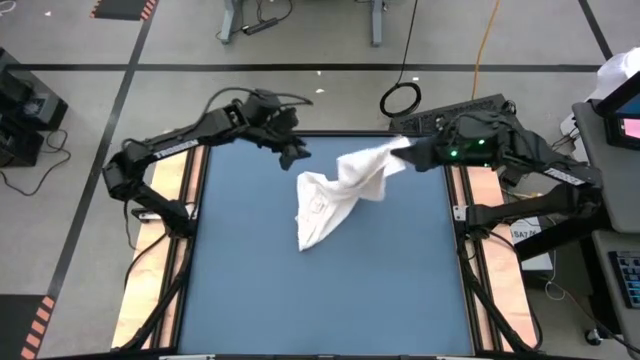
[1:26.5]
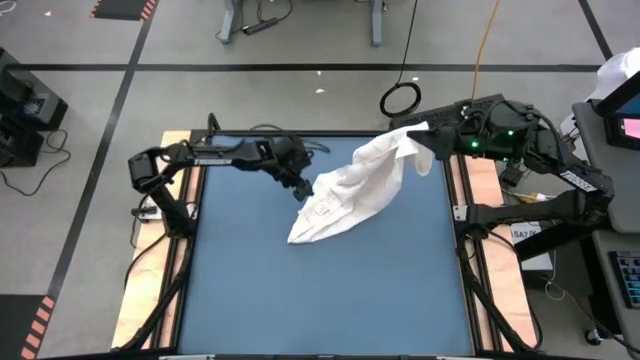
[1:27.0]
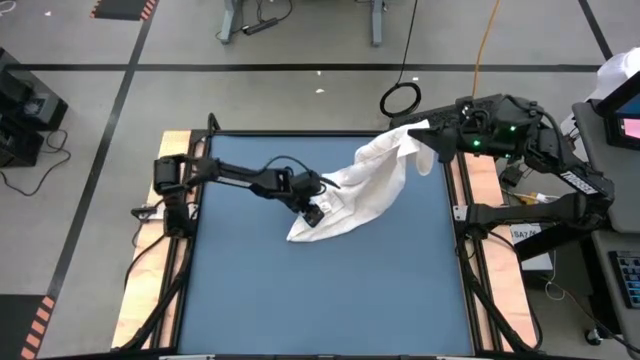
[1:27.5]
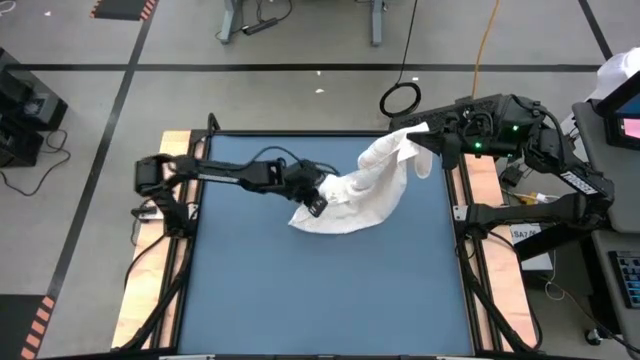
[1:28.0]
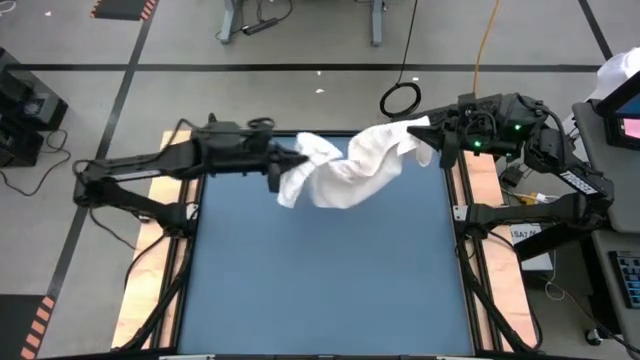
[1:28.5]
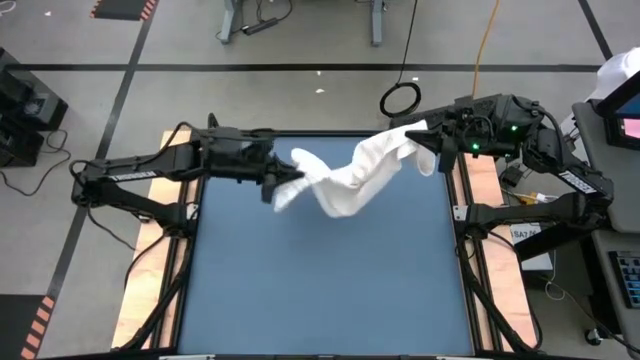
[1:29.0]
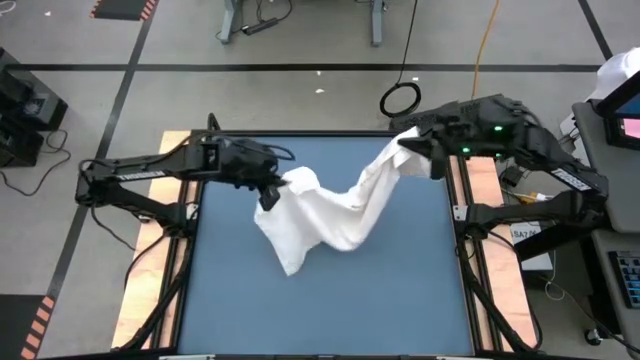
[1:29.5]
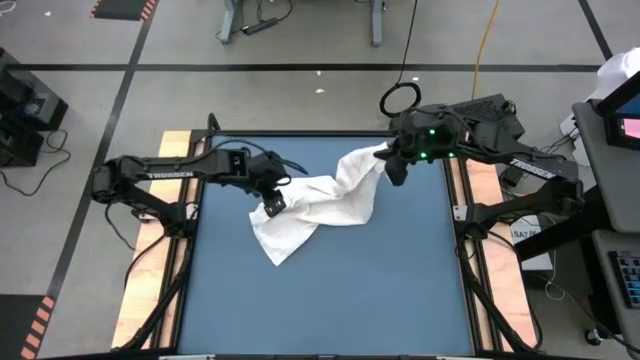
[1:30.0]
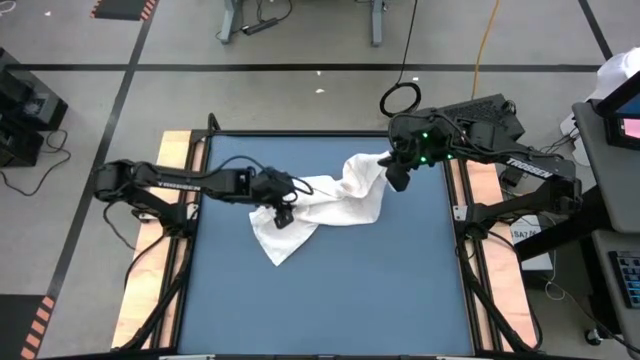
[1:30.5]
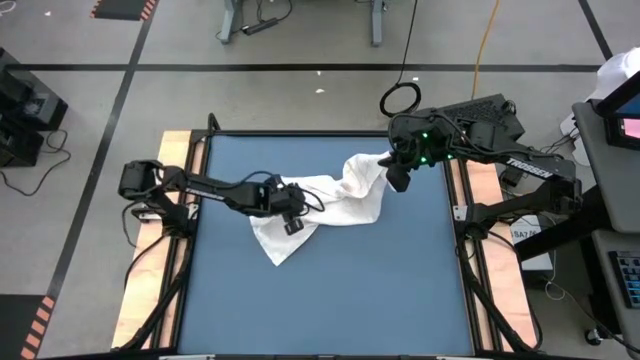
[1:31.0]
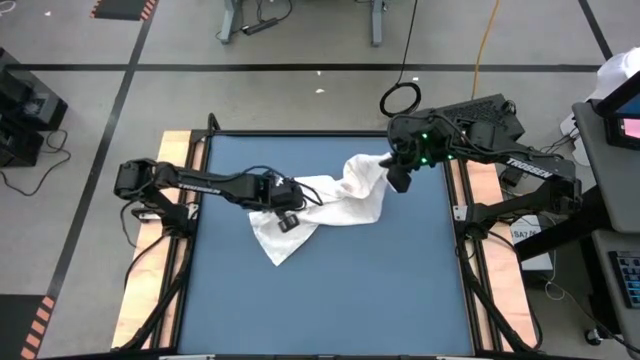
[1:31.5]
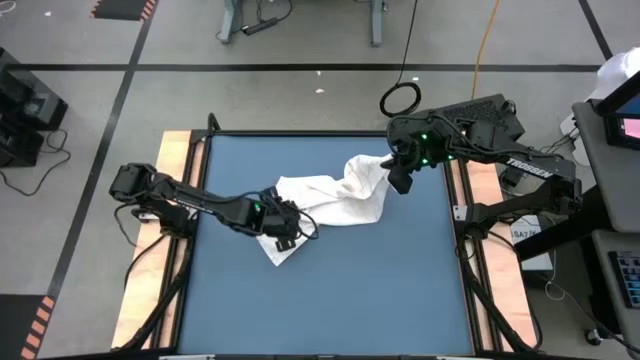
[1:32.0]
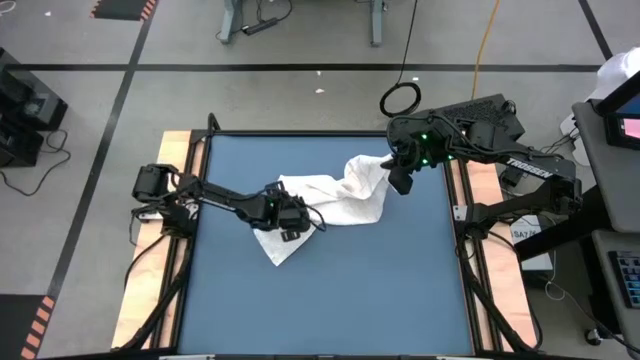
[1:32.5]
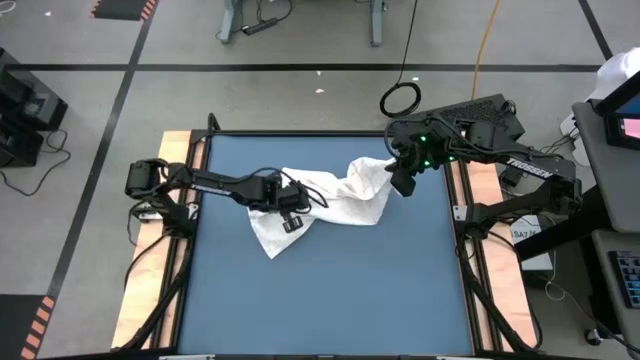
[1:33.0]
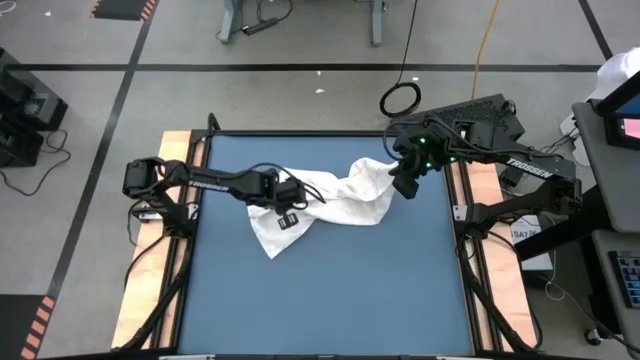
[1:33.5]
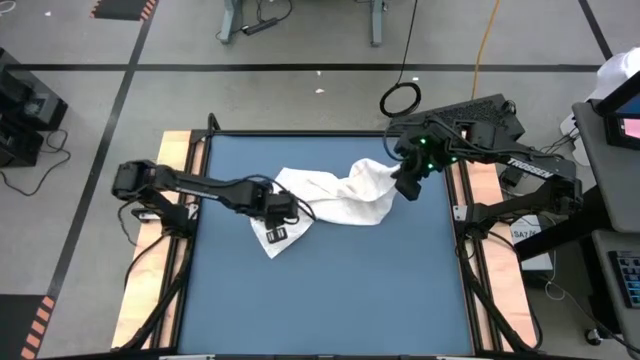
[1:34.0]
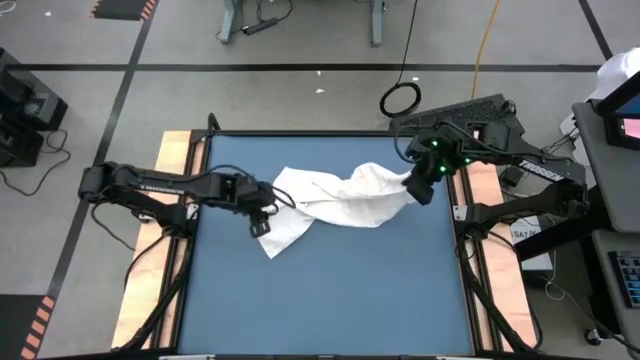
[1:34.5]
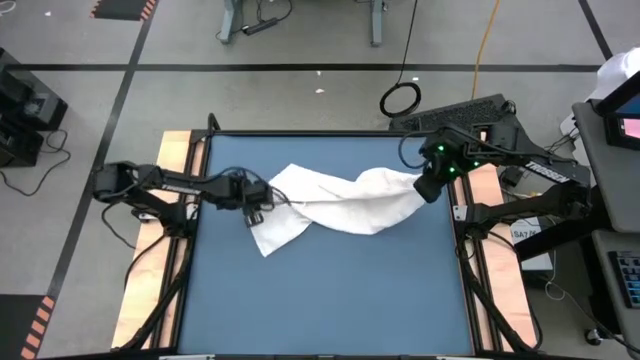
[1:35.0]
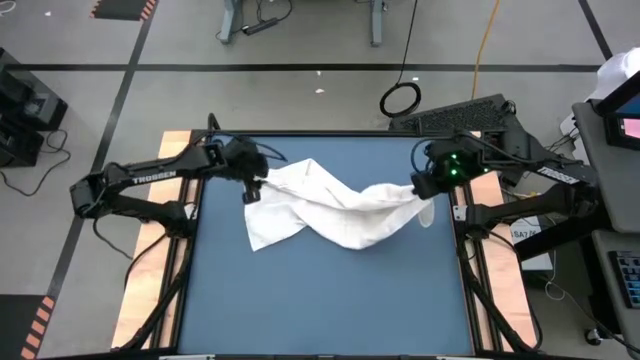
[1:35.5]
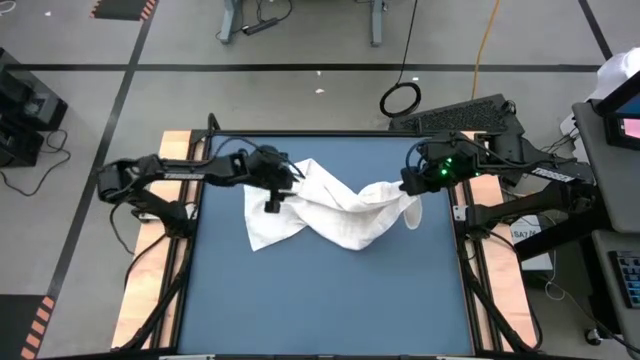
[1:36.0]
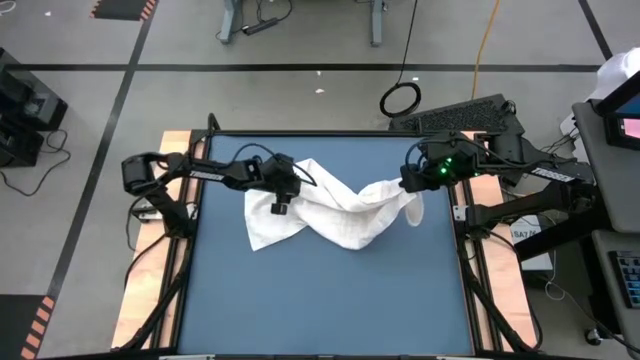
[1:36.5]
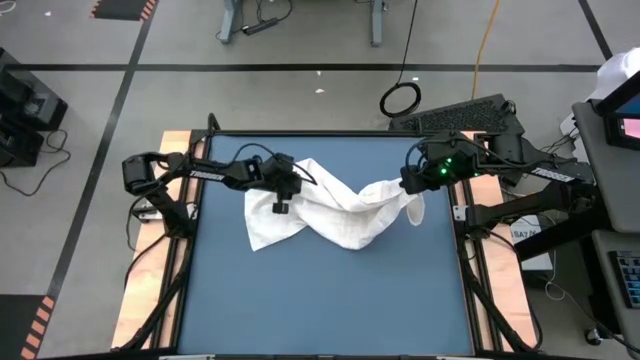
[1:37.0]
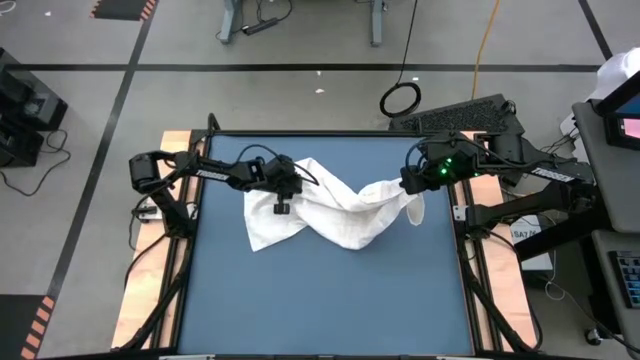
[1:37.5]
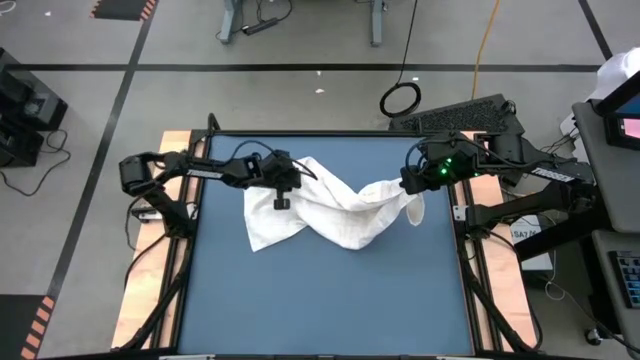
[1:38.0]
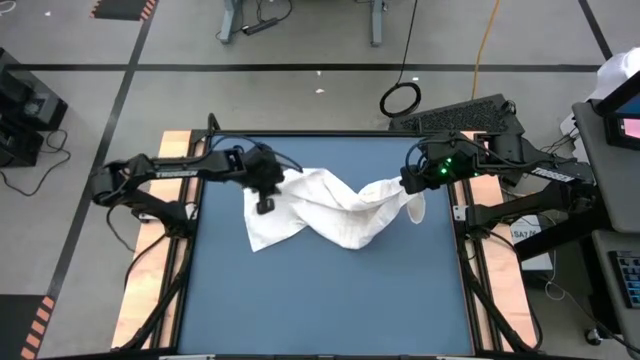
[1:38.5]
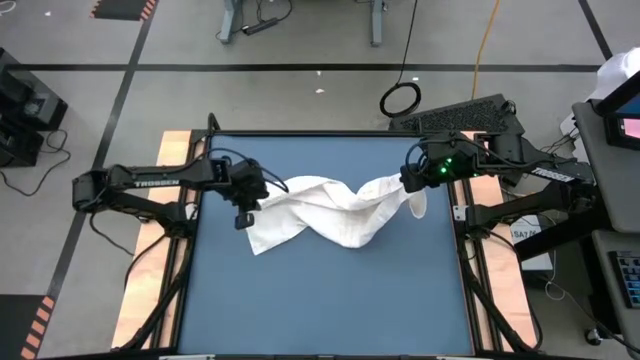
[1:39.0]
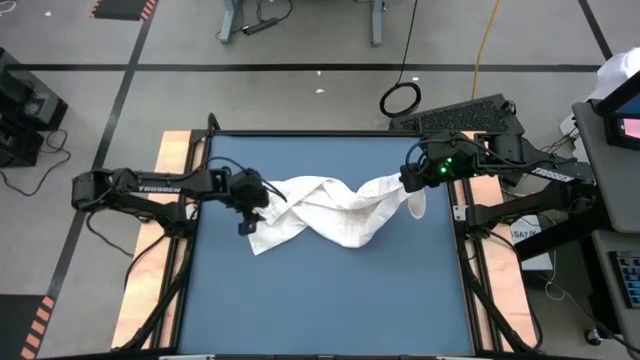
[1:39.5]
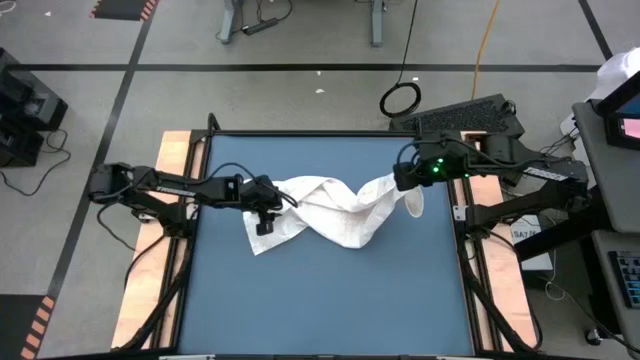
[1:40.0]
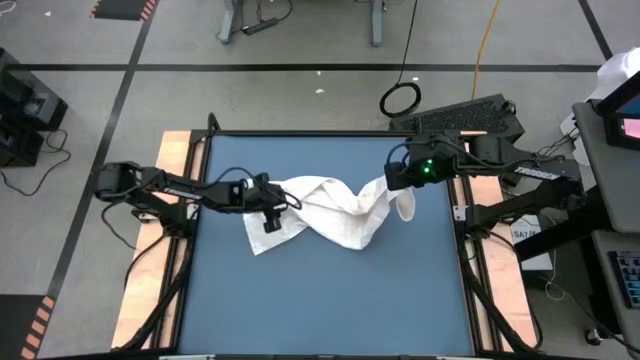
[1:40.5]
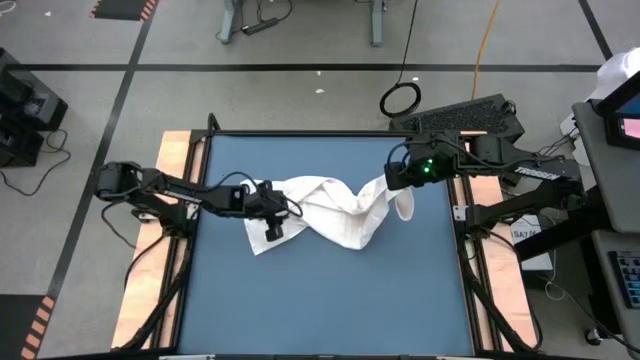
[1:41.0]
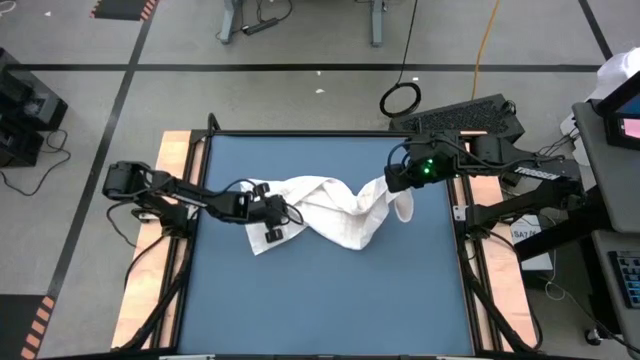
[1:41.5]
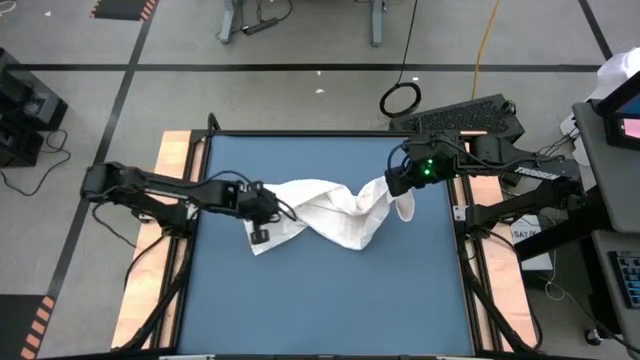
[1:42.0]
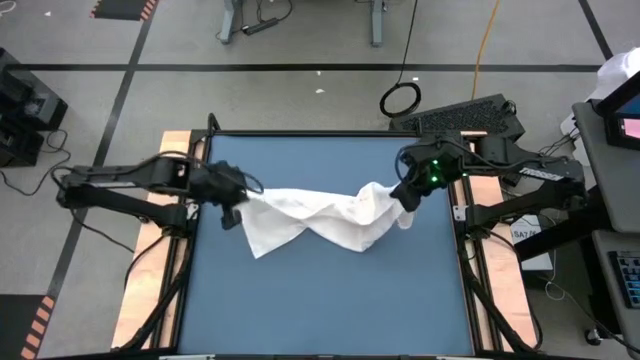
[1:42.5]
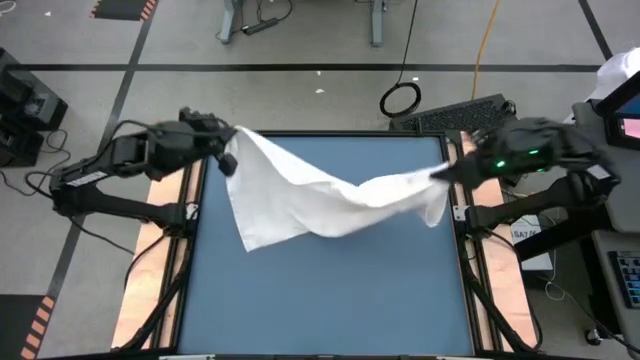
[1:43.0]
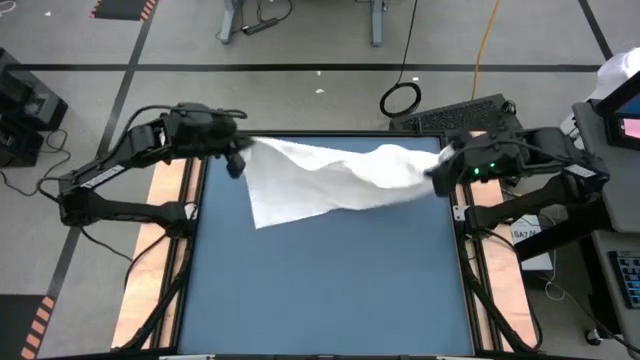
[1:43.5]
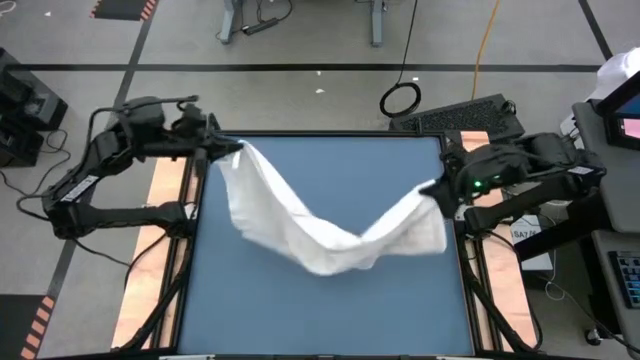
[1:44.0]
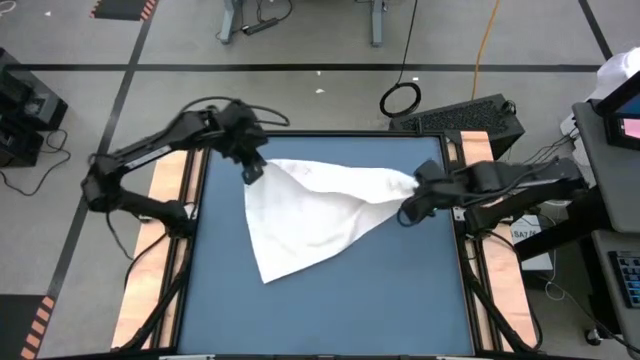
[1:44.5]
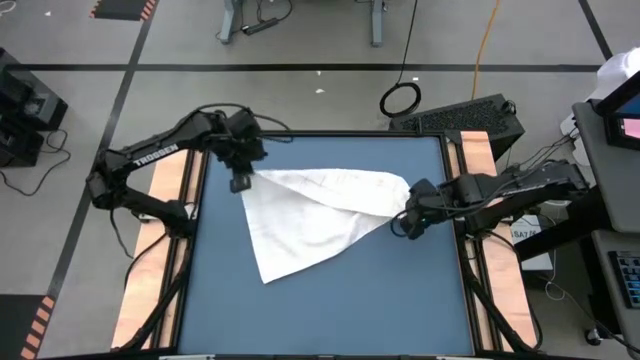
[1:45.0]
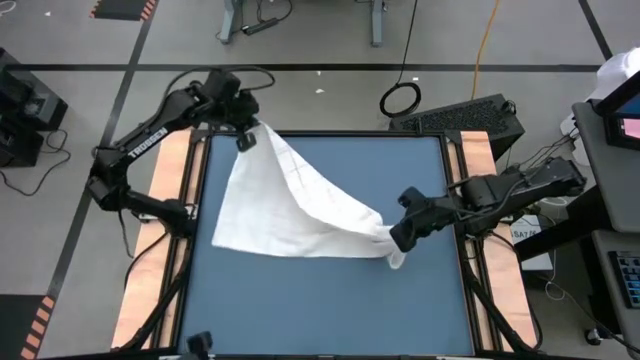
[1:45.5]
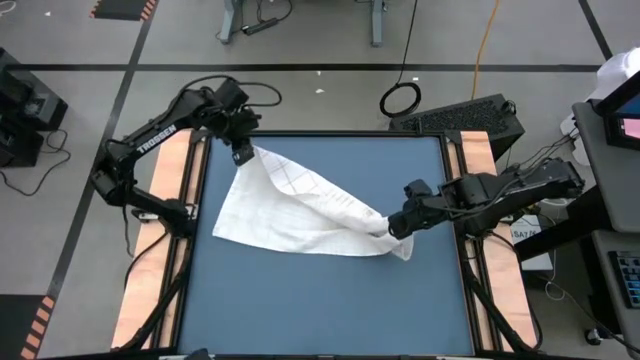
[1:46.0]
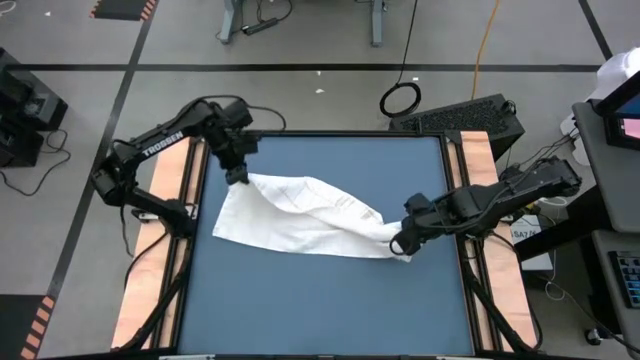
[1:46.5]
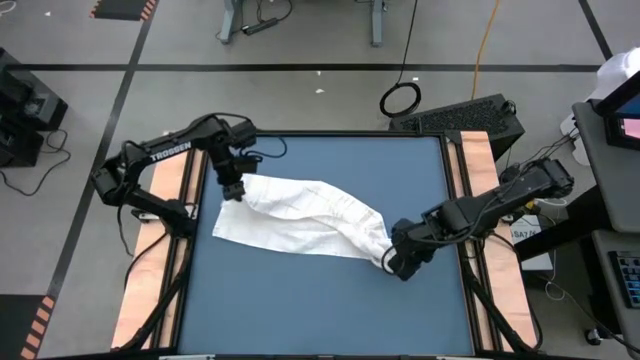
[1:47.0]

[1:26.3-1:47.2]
Task: Roll towel into tight, uniform cylinder
Roll the white towel
